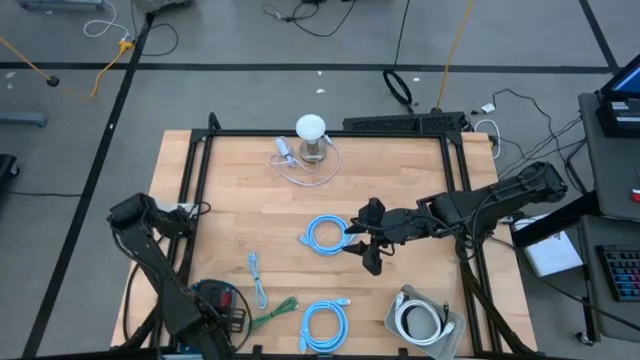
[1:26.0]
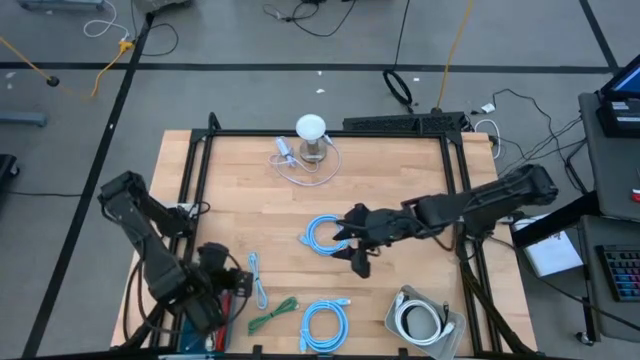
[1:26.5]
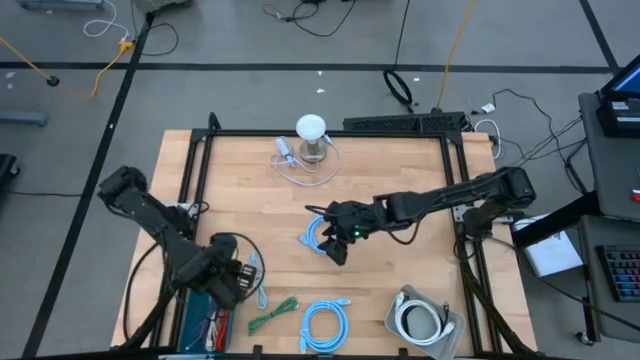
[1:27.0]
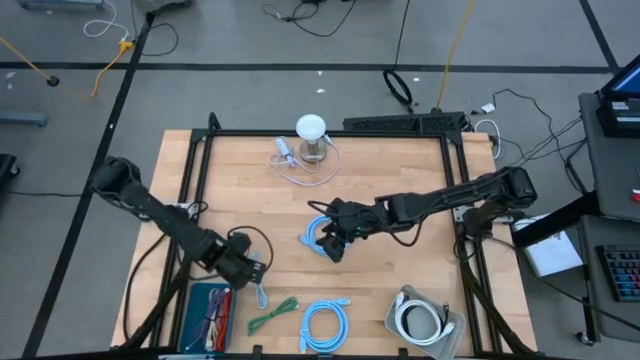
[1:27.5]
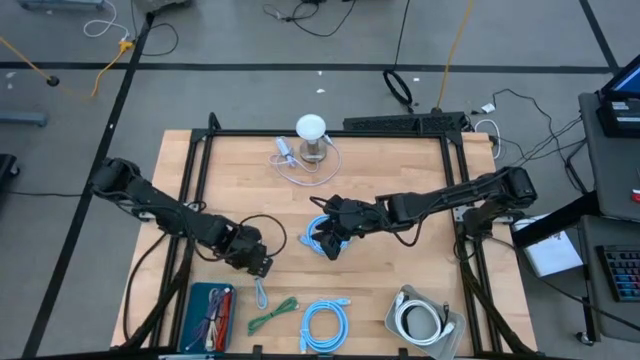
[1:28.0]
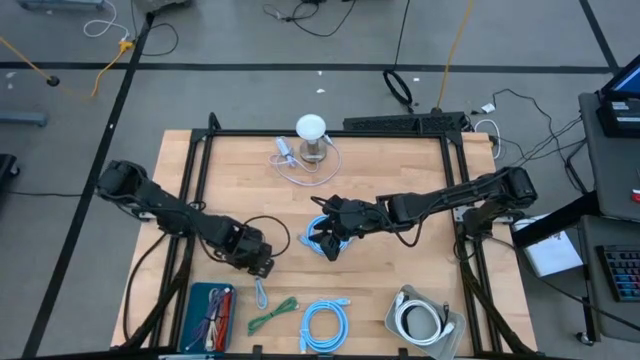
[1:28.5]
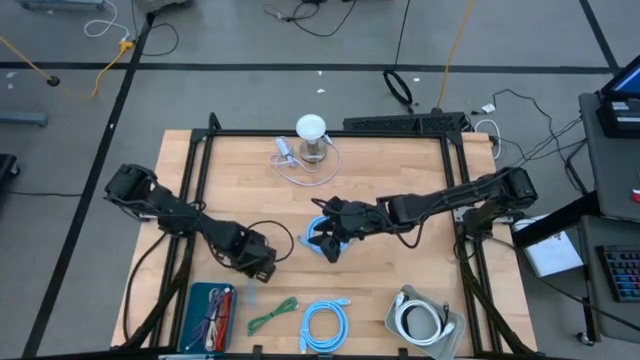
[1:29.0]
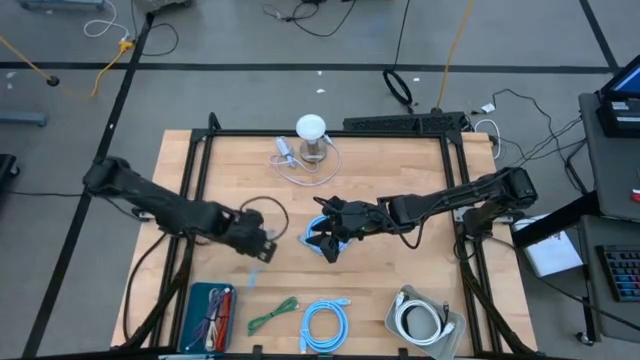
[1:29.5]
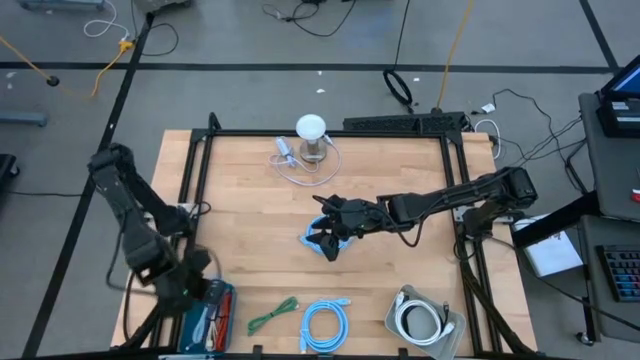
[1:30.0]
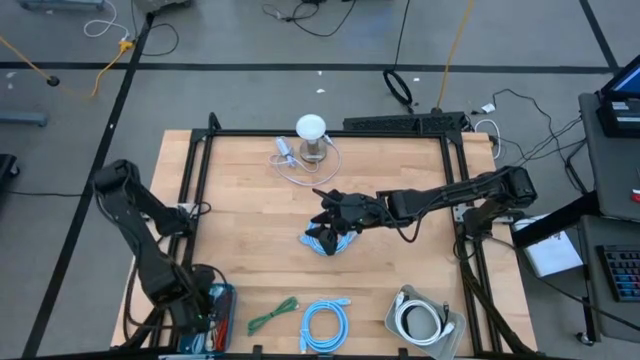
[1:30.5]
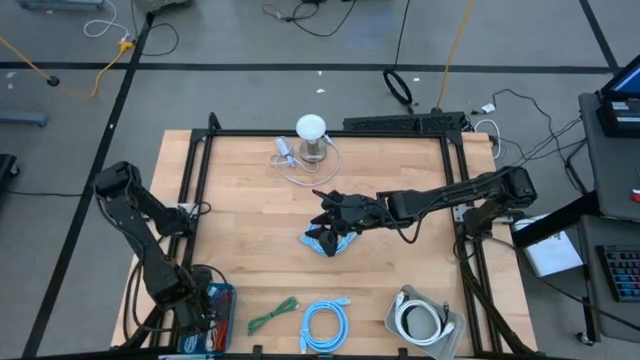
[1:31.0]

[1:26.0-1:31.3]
Task: Pick & Place USB Port
Put the blue charger cable into the blue bin

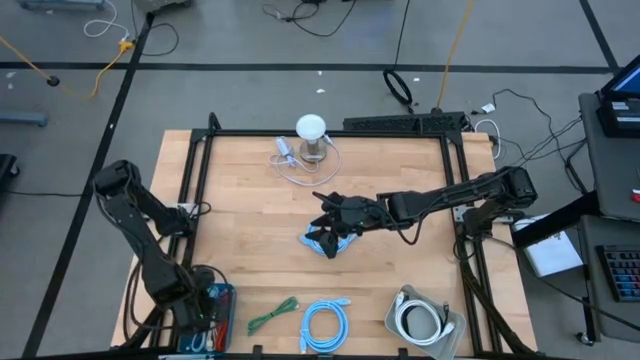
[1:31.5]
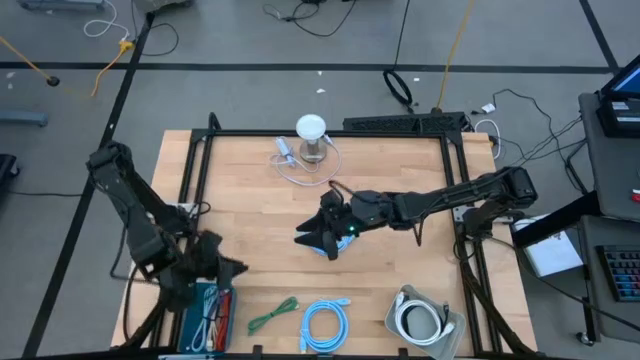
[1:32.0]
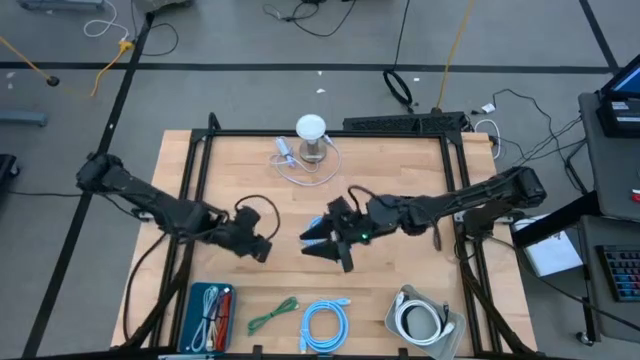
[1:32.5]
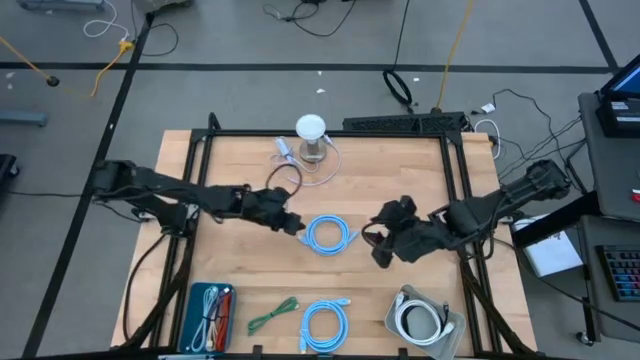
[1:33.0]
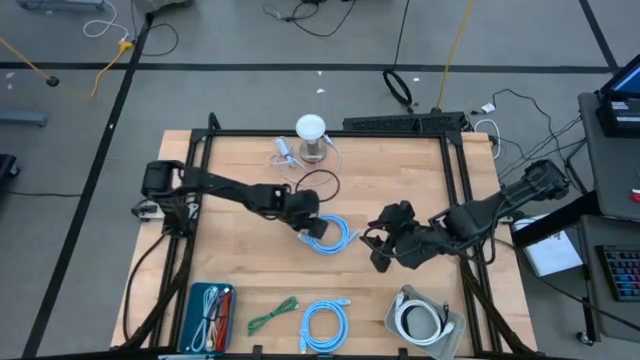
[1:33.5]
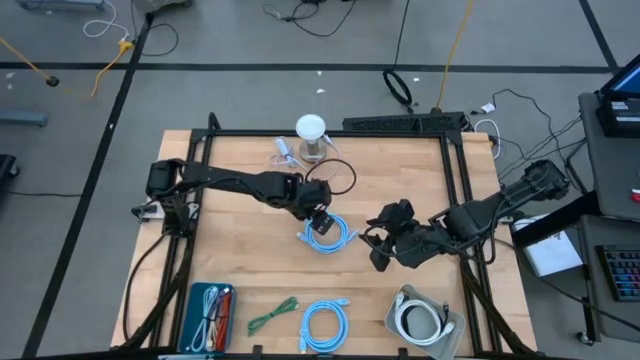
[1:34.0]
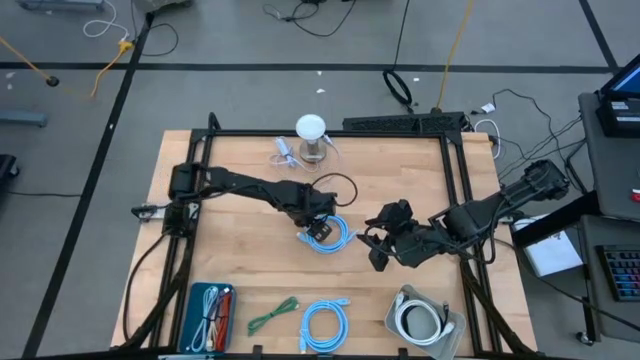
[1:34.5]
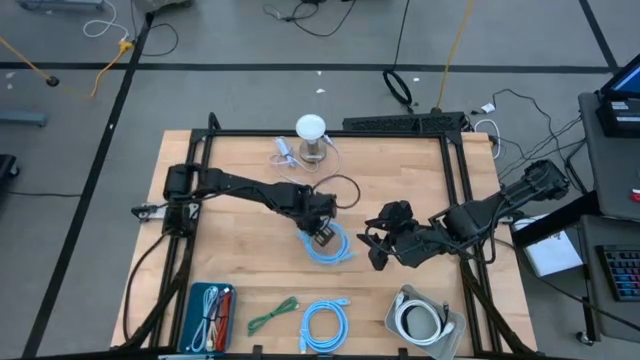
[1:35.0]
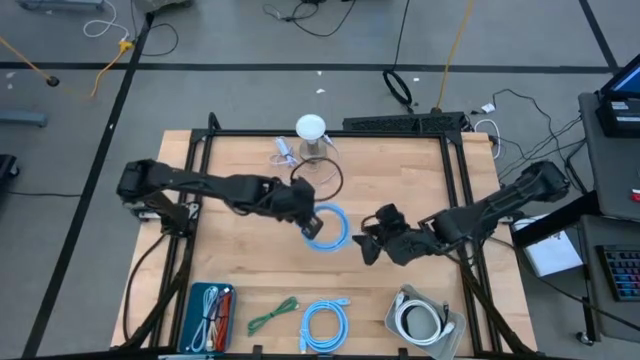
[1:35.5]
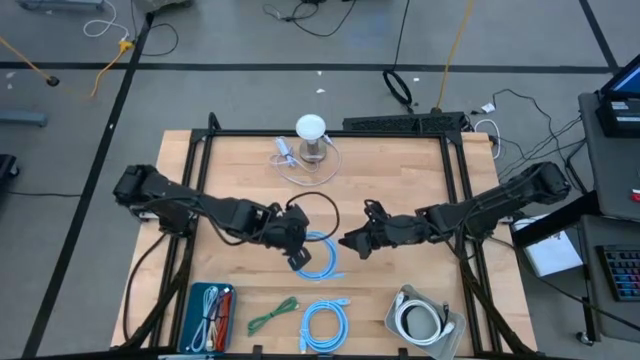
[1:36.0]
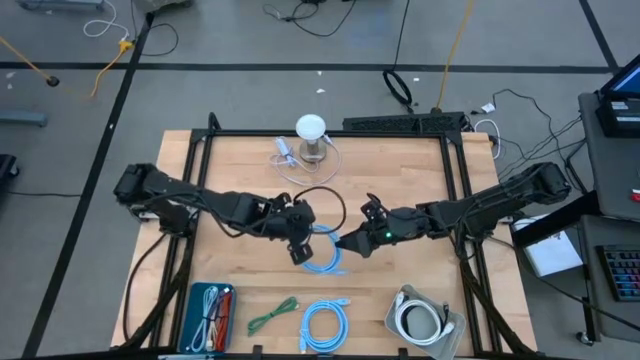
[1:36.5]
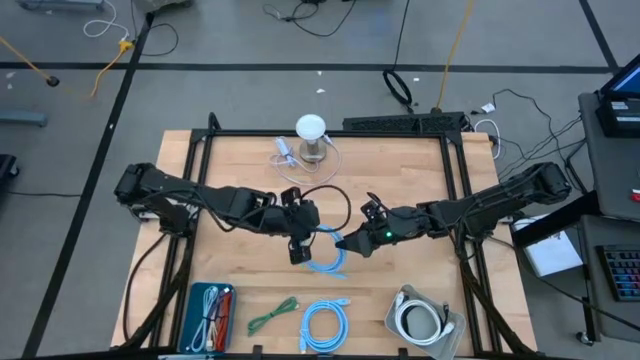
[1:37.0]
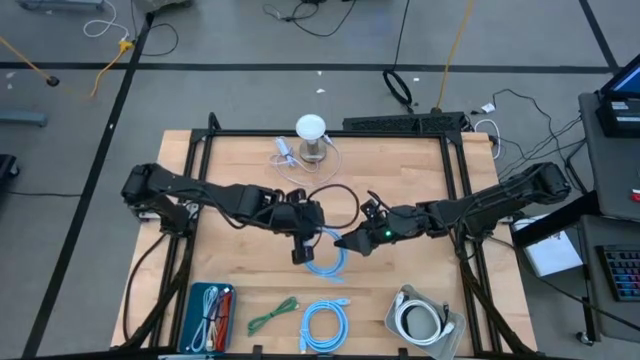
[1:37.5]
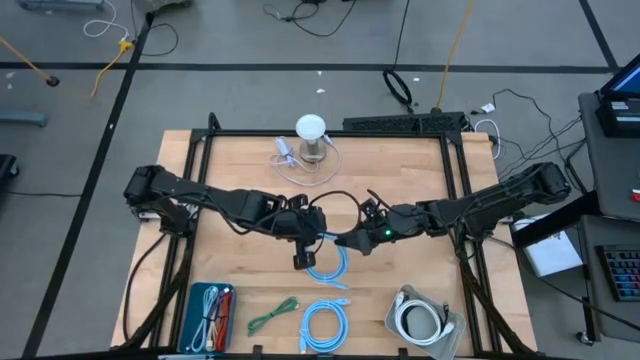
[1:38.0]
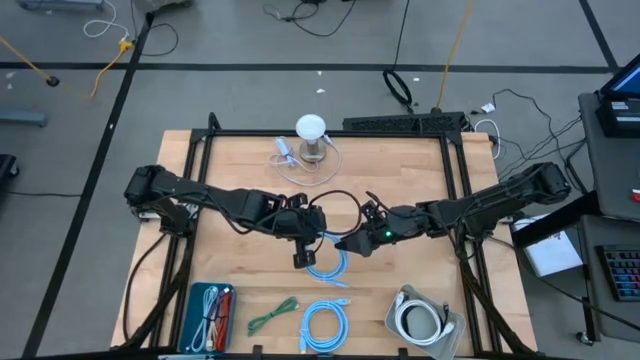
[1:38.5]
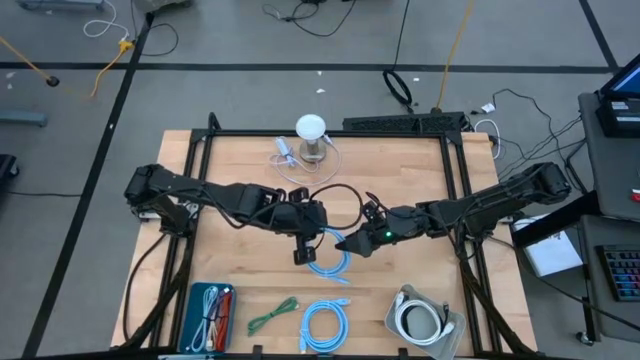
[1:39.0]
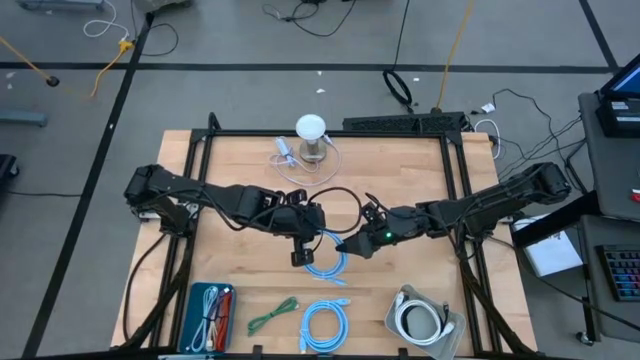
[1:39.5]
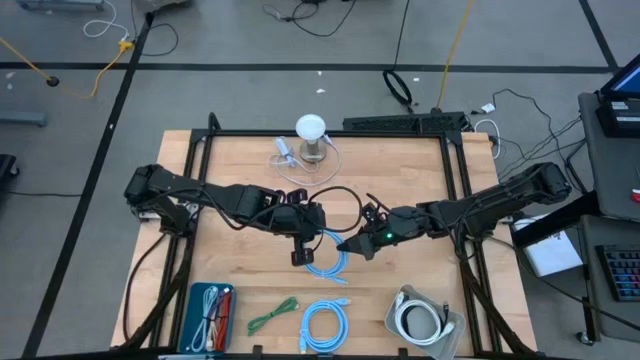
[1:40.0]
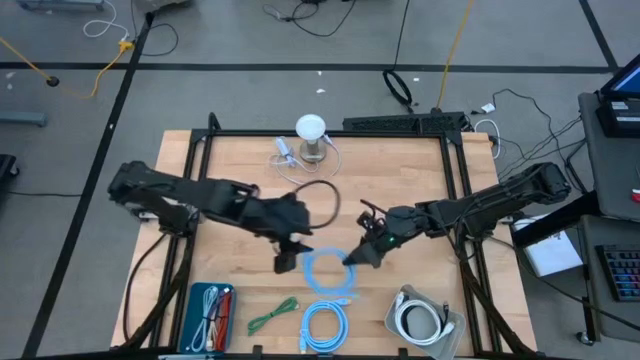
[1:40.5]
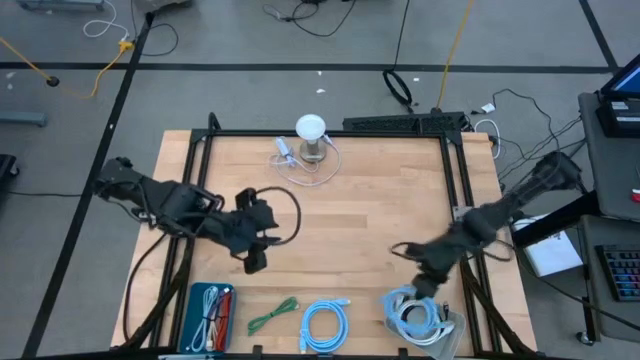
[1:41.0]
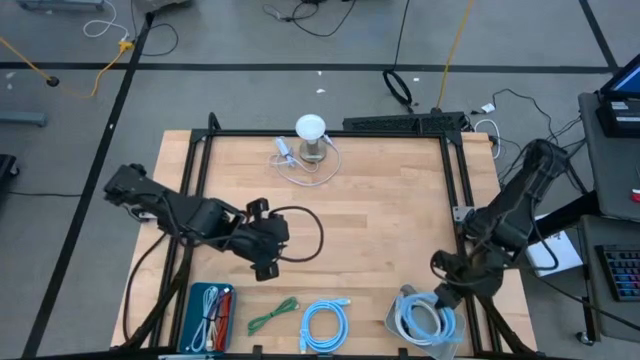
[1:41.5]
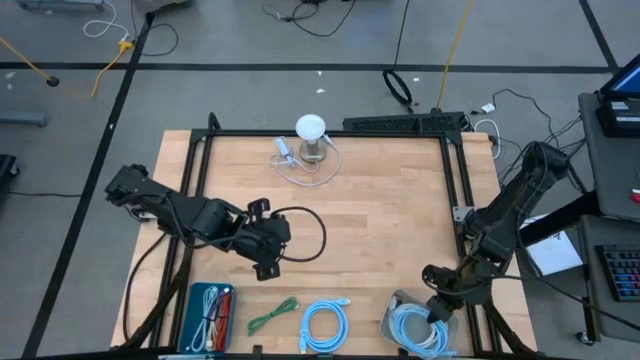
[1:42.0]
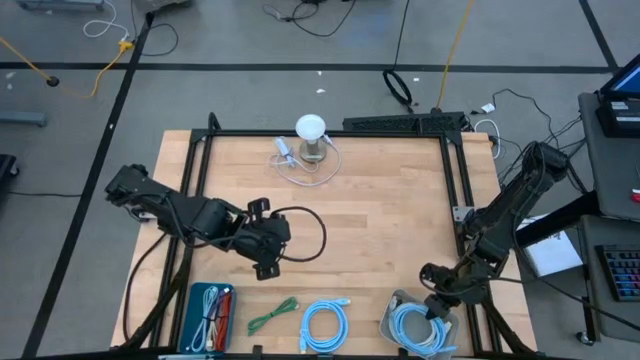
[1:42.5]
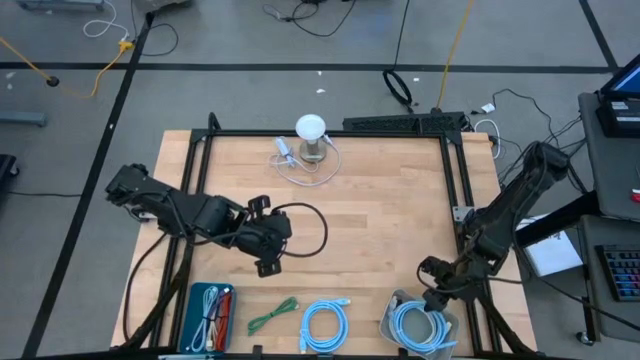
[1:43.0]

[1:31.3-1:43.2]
Put the top blue video cable into the gray bin
